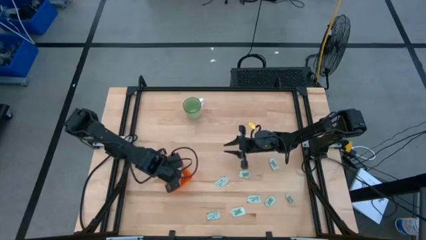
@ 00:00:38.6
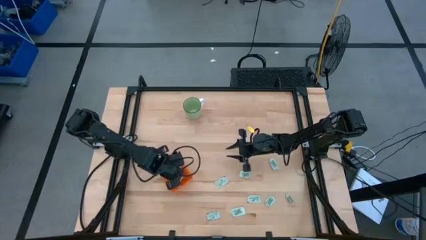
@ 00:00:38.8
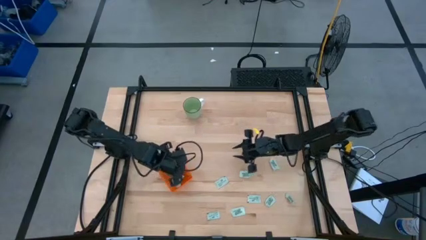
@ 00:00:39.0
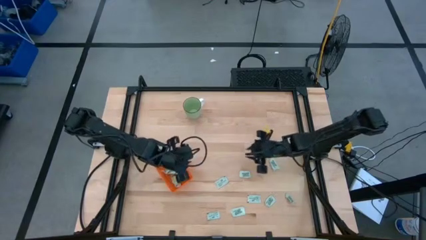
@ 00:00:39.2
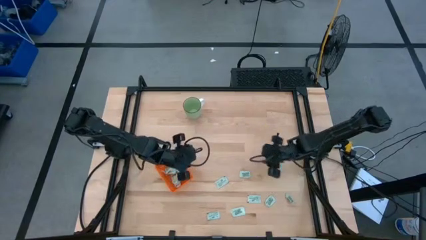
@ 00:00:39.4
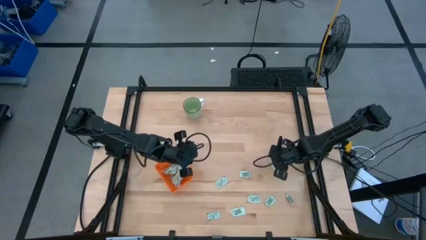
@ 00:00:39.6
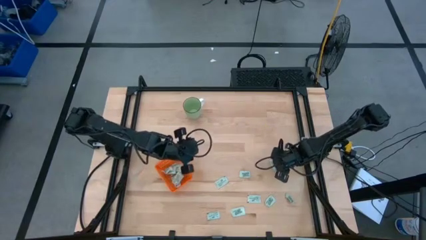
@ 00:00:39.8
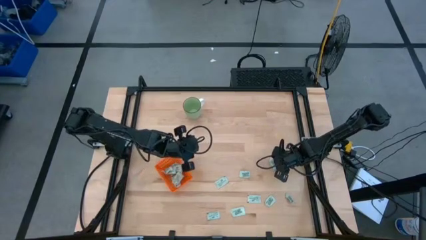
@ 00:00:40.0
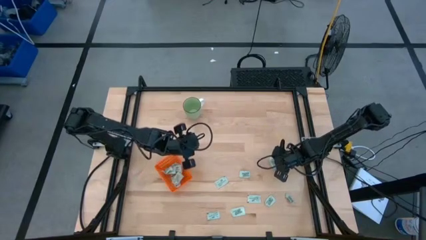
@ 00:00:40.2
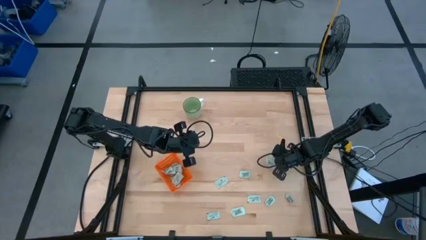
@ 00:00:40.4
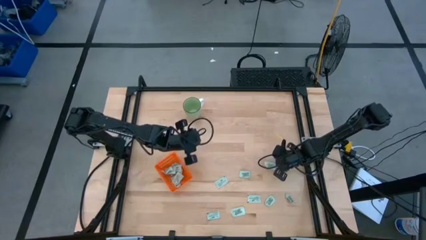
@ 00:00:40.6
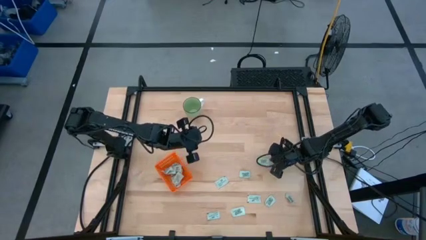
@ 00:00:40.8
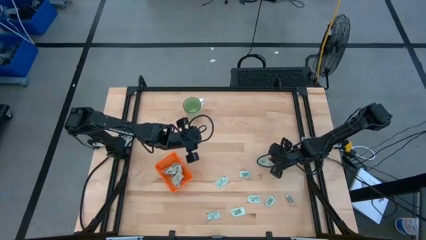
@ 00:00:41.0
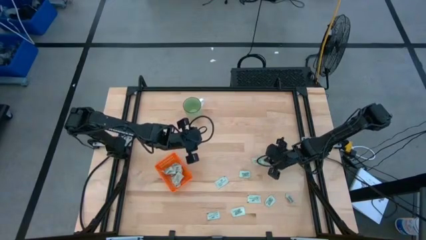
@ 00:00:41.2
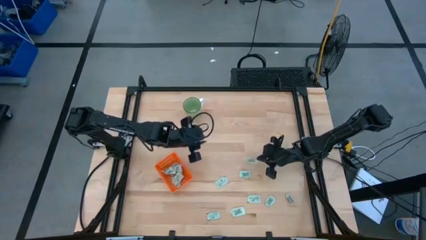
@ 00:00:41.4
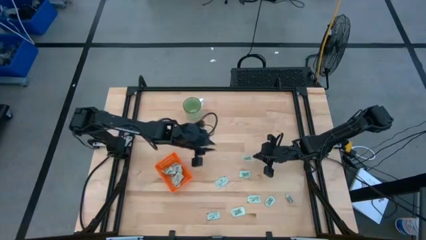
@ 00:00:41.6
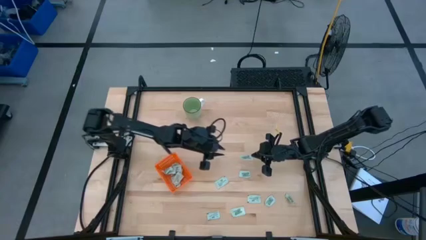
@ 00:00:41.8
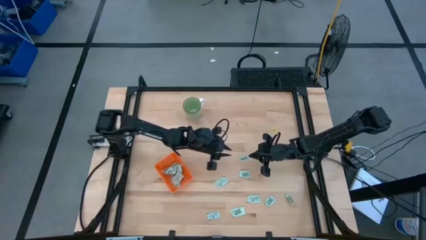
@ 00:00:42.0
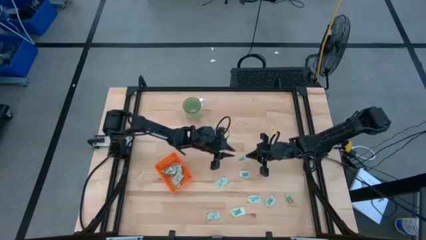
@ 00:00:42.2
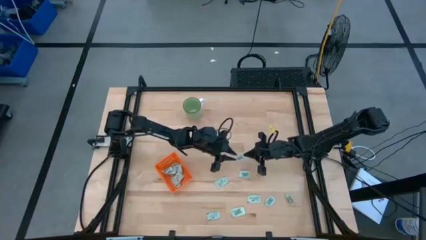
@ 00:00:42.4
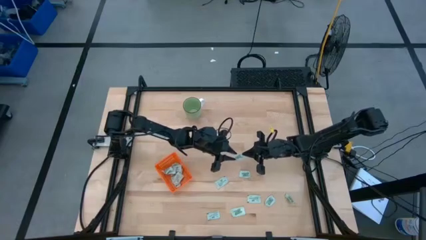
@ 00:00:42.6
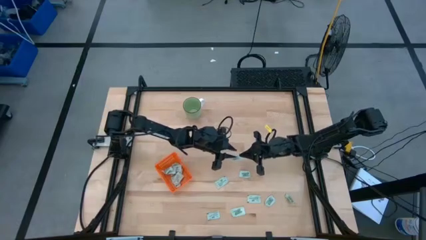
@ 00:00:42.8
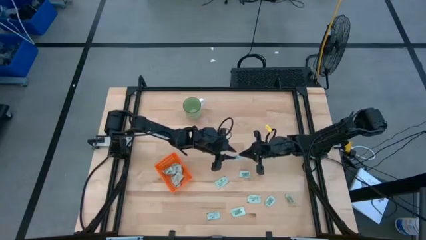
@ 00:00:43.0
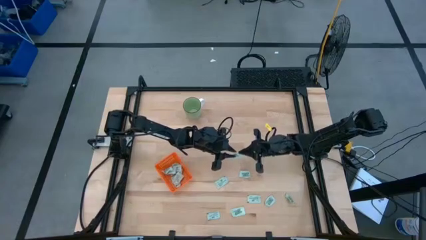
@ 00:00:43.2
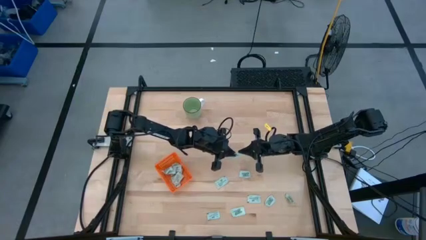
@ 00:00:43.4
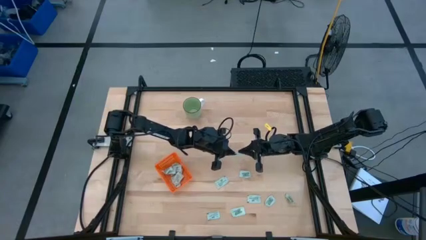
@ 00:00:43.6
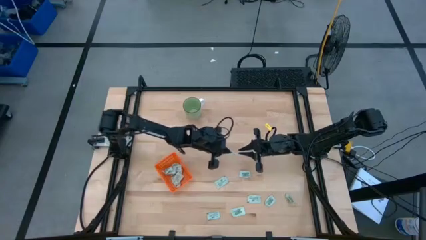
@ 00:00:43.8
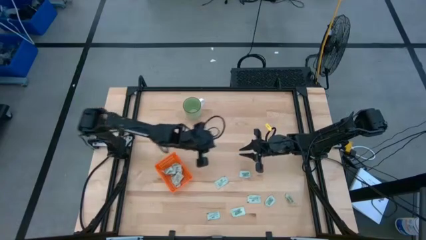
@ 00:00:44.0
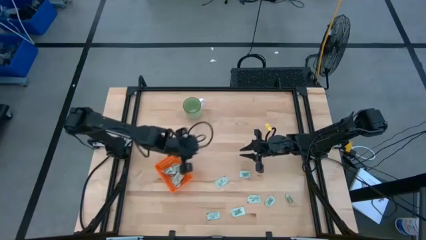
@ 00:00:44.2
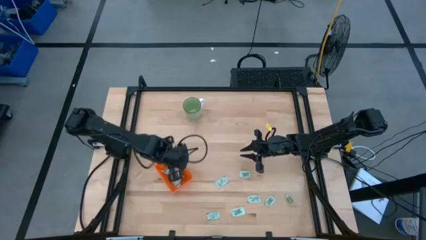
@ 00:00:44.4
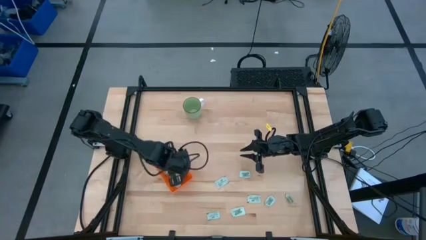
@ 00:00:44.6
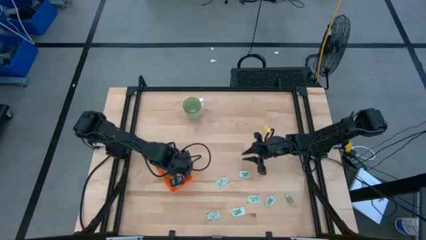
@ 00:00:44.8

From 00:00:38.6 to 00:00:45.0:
Task: Pick and place Stevia / Truvia into bins
Put the stevia packet into the orange basket

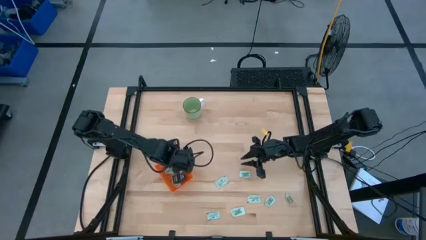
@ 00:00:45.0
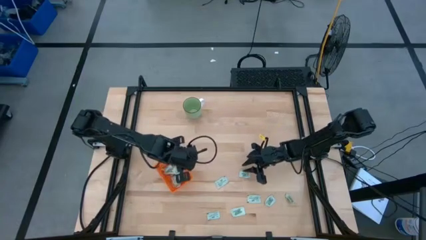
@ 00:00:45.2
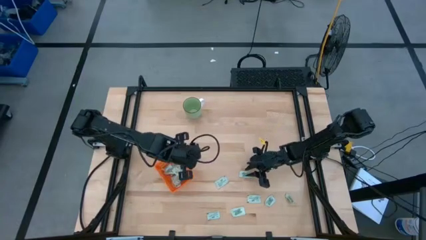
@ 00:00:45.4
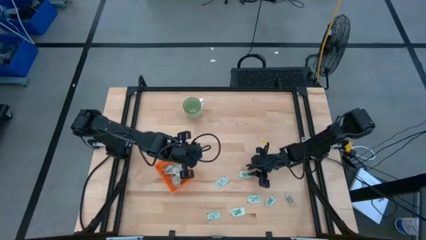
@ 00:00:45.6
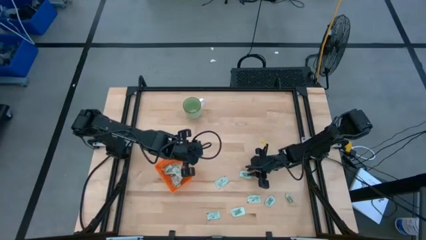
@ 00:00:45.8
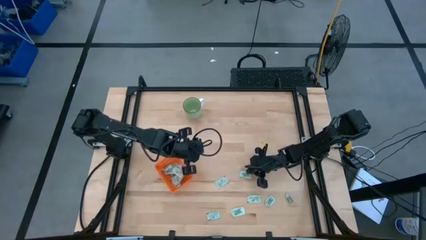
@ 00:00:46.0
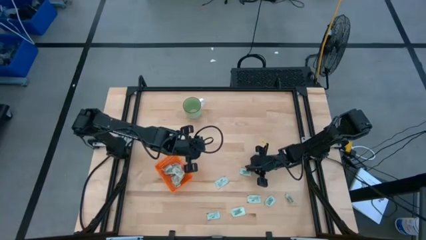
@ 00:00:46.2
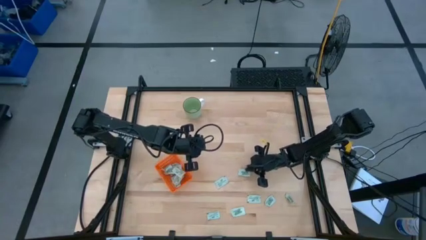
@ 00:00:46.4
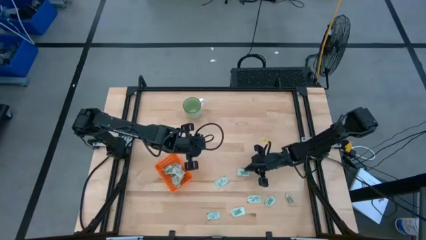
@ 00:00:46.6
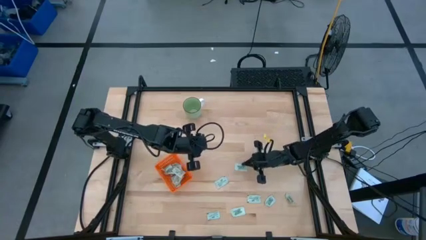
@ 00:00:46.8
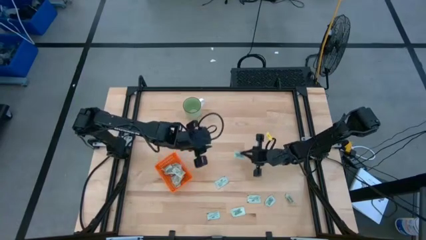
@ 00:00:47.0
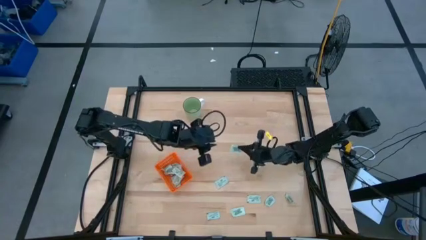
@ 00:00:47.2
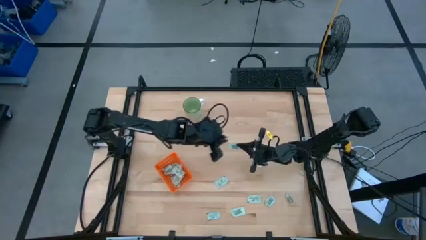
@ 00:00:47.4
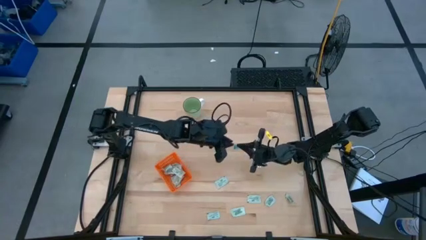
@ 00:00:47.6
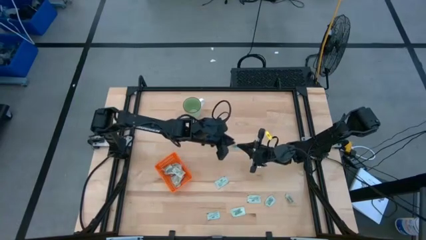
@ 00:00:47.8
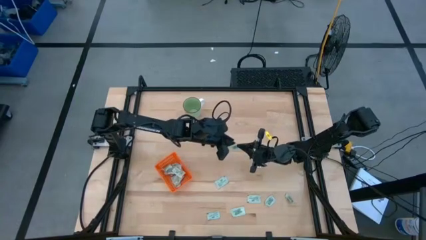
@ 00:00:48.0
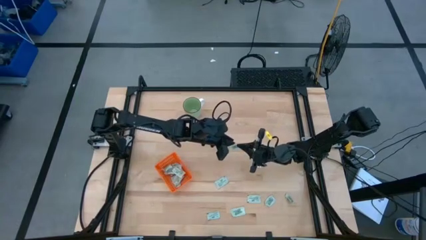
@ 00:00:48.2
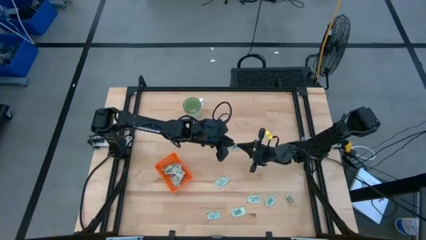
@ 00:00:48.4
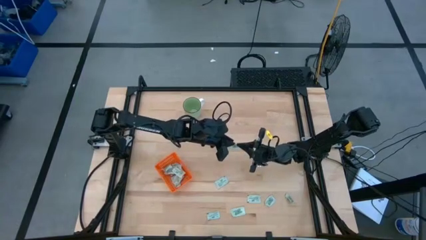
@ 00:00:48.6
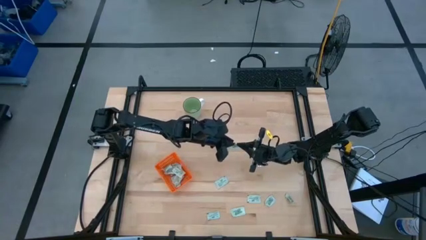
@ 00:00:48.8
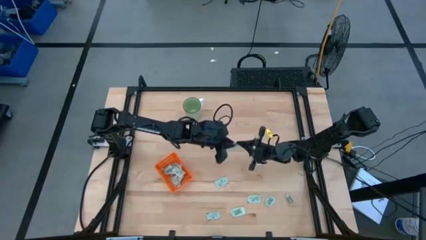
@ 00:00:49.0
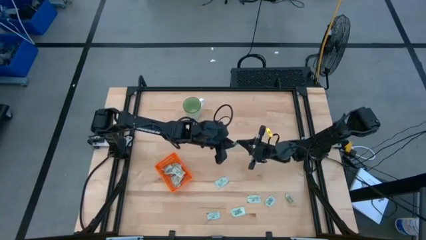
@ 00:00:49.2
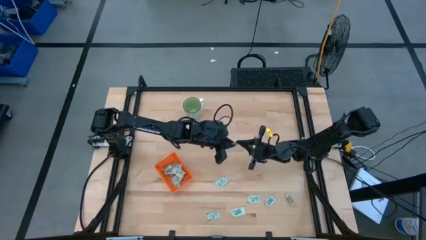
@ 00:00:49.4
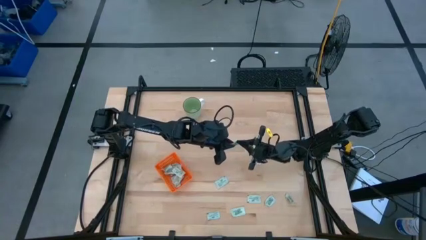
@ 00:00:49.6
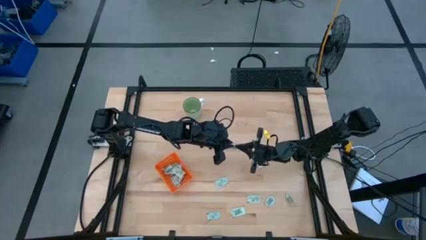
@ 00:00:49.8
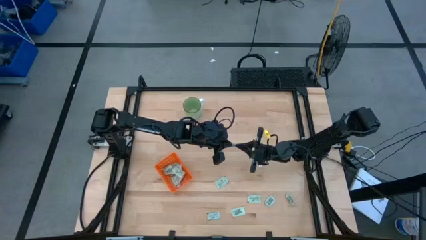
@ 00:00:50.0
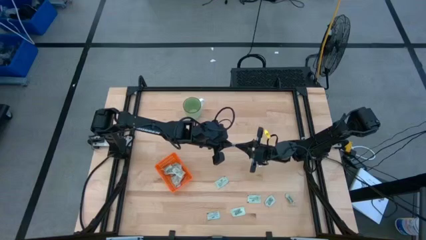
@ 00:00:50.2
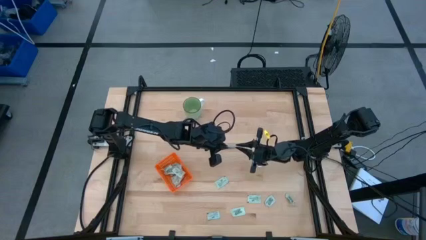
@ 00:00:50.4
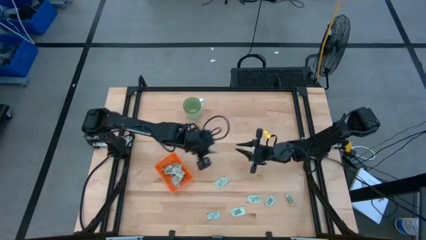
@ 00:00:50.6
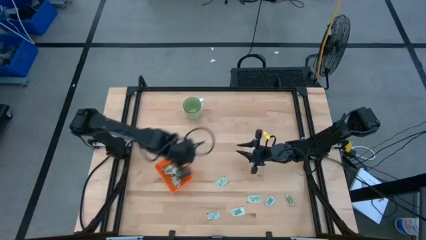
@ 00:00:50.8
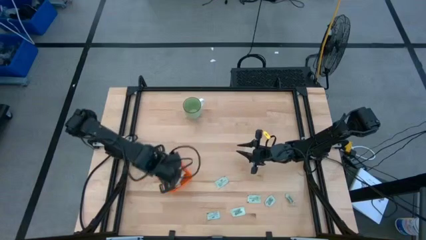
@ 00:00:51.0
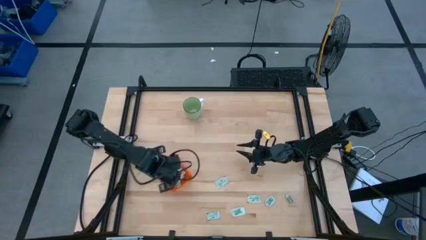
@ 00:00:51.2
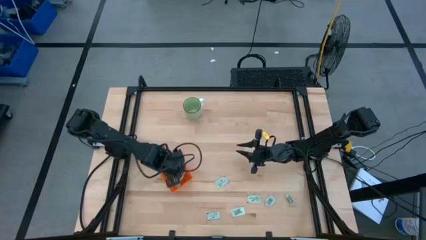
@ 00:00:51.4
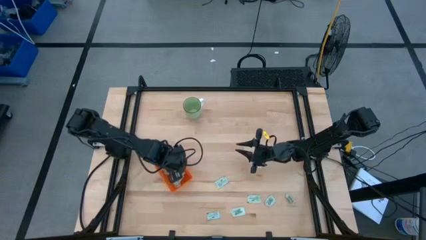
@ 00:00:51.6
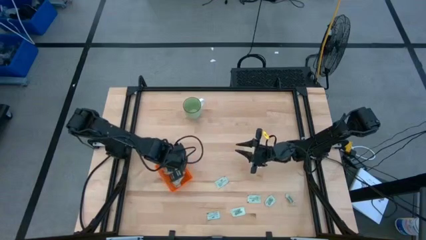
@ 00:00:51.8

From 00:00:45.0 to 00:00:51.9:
Put the stevia packet into the orange basket

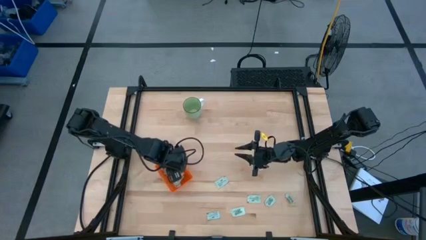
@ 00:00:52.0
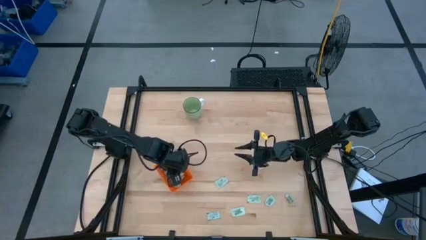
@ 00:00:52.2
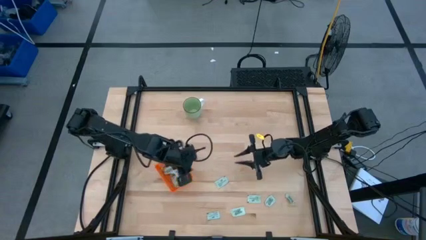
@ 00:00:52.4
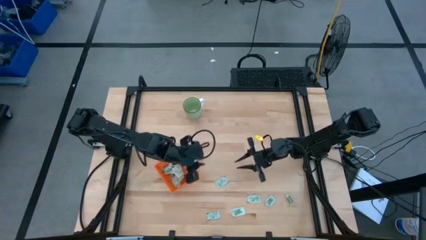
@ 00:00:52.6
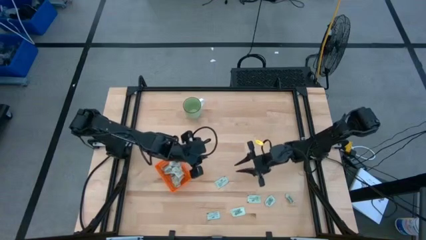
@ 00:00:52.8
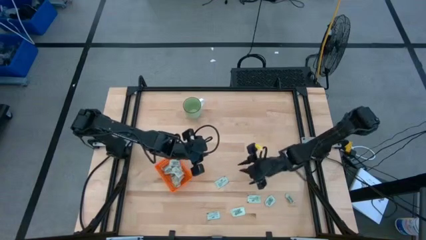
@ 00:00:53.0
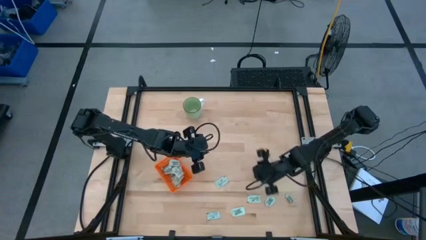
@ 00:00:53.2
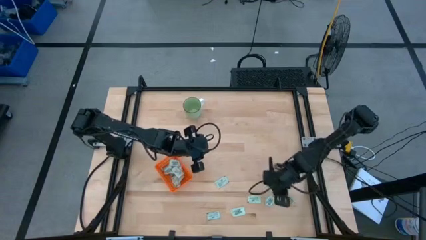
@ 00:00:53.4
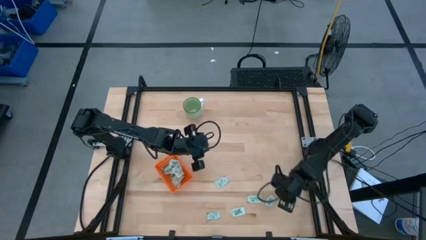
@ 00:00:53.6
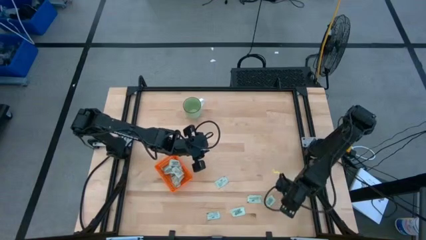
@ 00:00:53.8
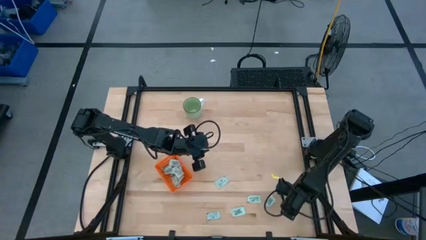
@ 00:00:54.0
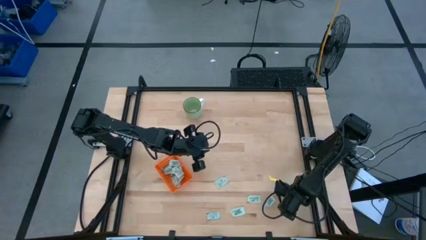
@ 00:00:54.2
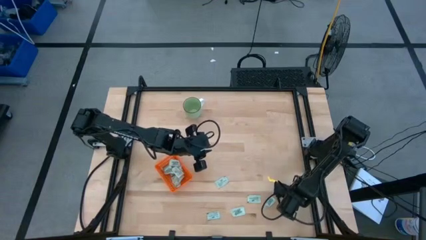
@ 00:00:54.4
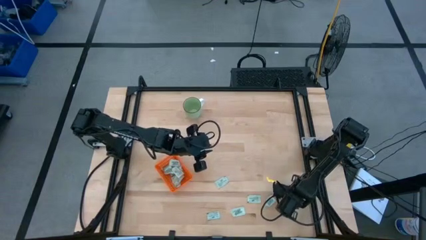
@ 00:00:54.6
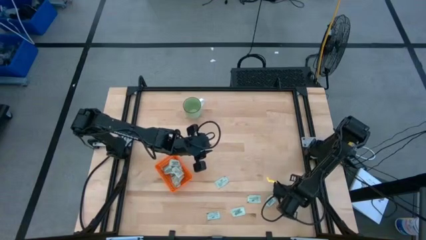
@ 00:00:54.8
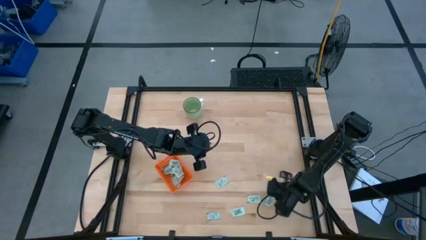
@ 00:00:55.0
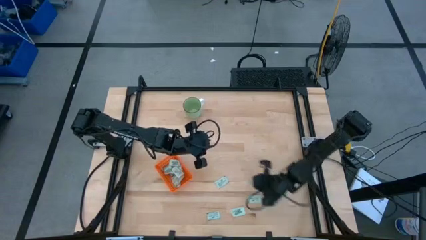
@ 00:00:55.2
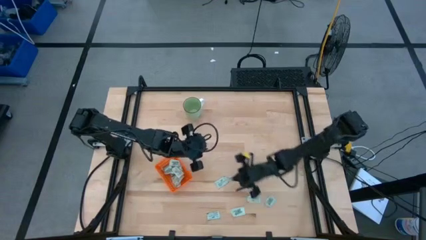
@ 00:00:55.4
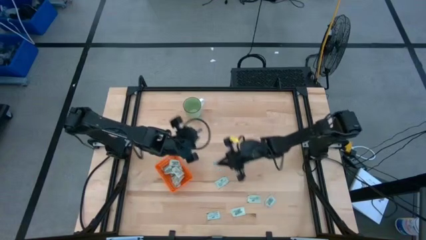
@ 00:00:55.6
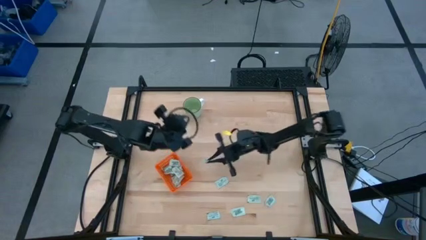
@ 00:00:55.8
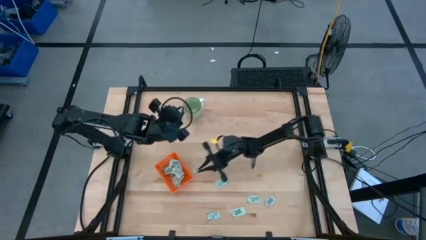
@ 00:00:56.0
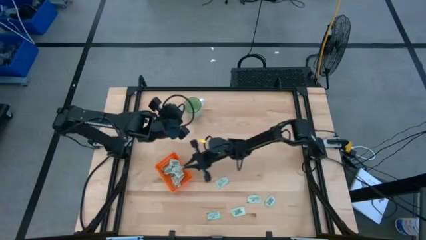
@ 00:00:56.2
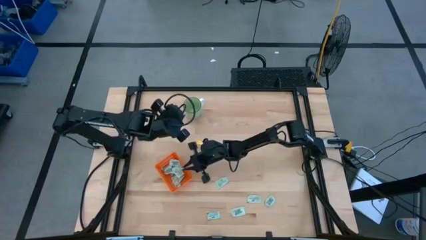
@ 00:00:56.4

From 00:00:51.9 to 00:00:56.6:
Put the stevia packet into the orange basket
